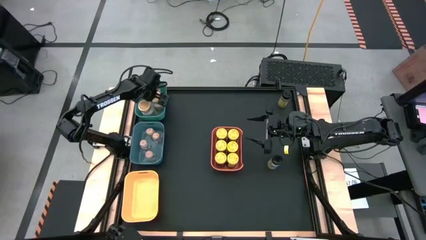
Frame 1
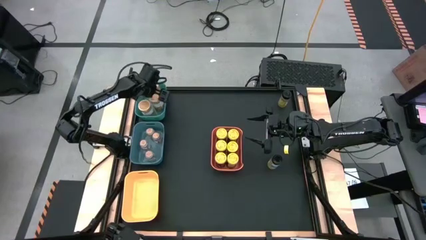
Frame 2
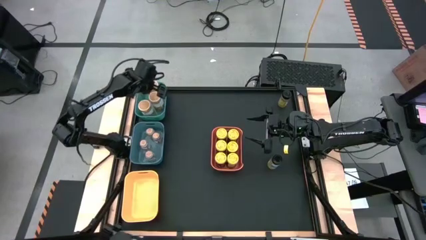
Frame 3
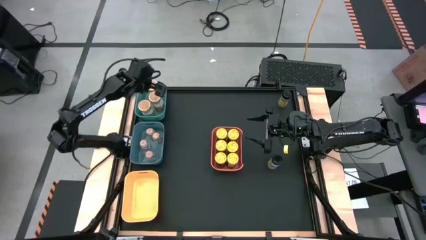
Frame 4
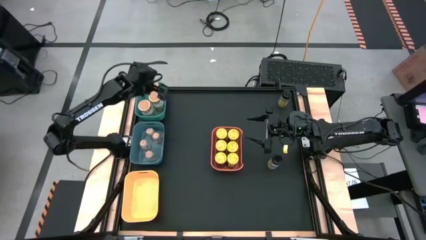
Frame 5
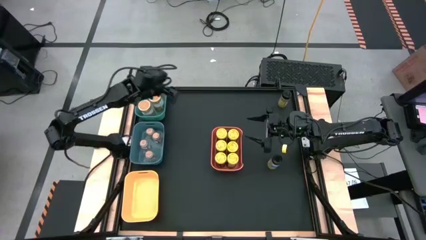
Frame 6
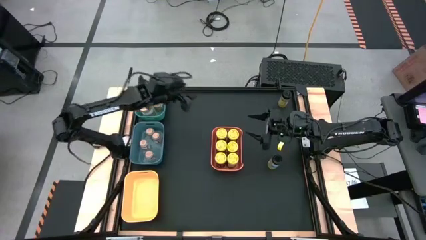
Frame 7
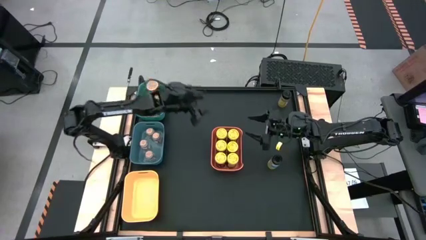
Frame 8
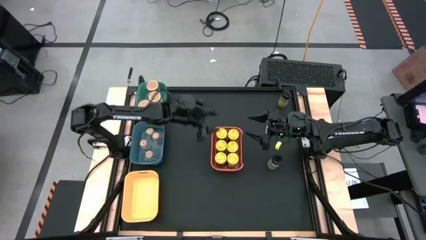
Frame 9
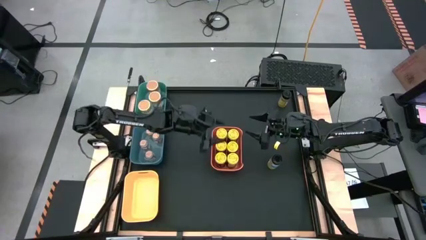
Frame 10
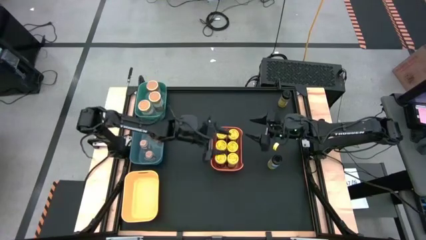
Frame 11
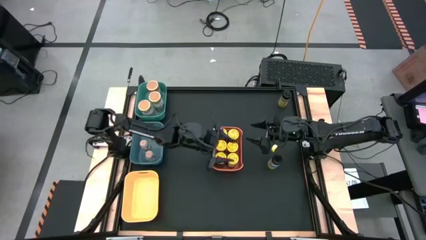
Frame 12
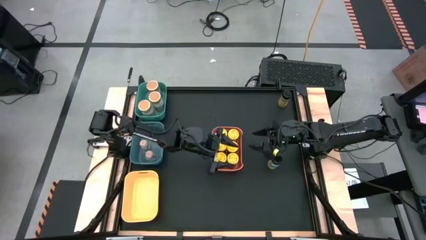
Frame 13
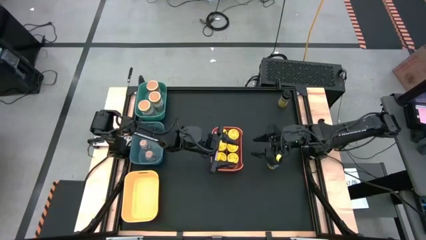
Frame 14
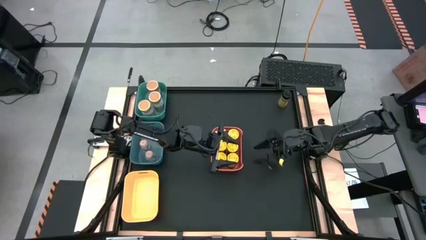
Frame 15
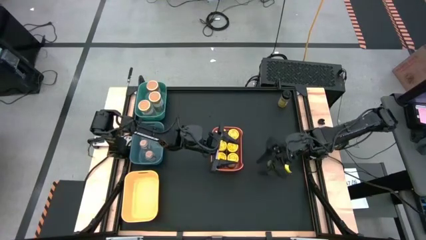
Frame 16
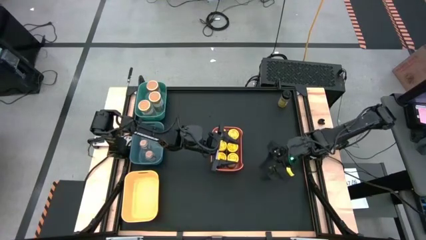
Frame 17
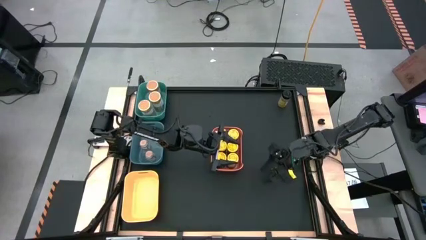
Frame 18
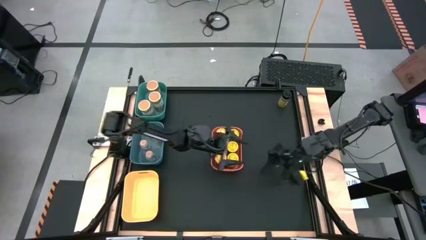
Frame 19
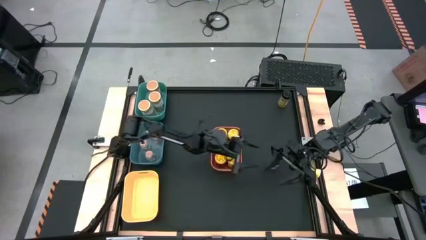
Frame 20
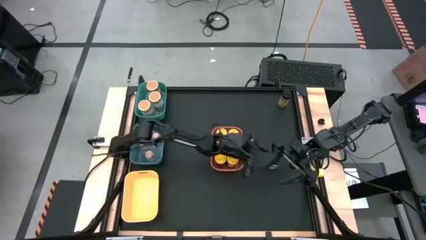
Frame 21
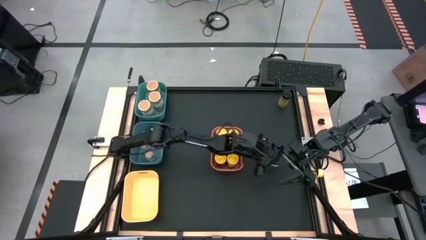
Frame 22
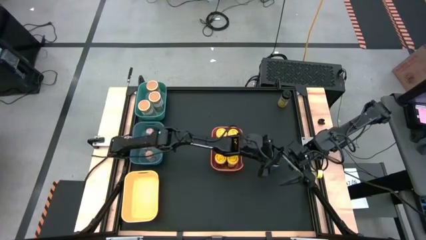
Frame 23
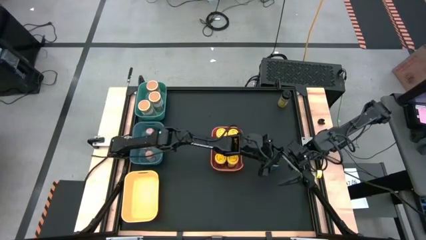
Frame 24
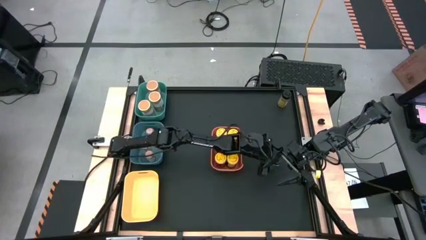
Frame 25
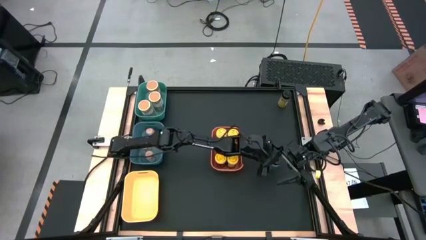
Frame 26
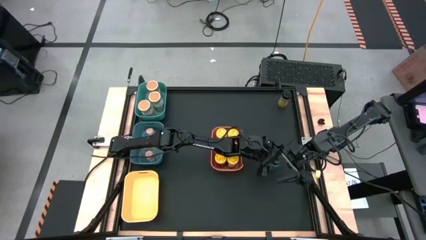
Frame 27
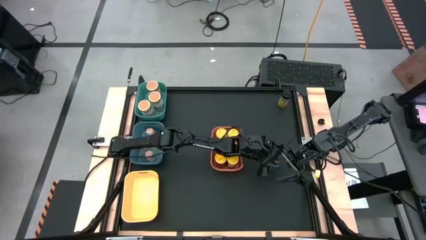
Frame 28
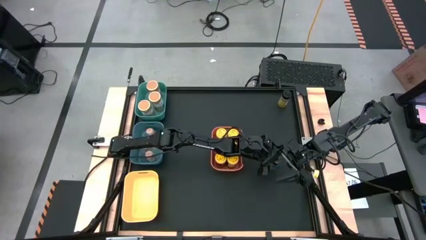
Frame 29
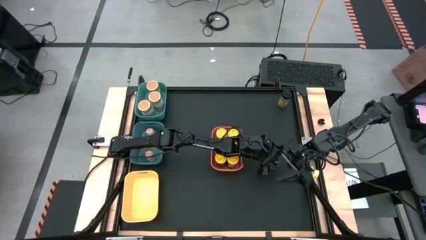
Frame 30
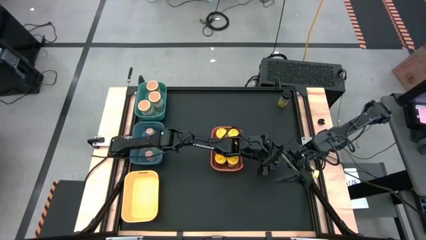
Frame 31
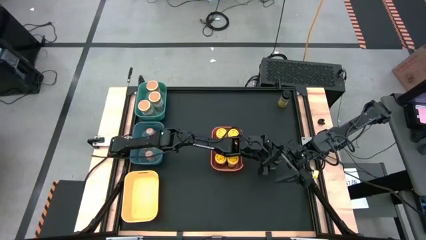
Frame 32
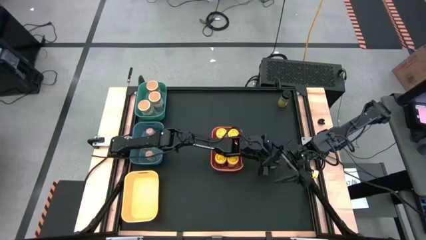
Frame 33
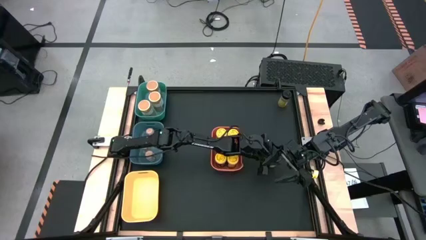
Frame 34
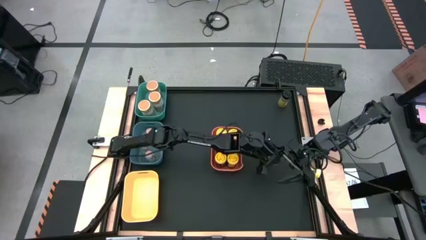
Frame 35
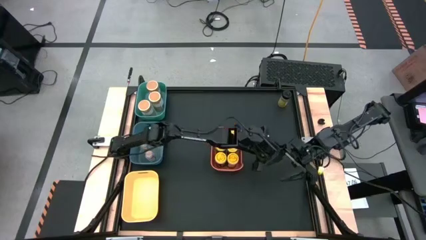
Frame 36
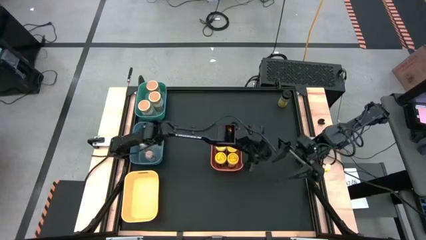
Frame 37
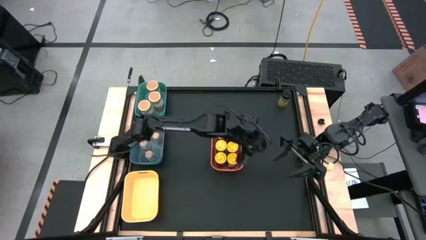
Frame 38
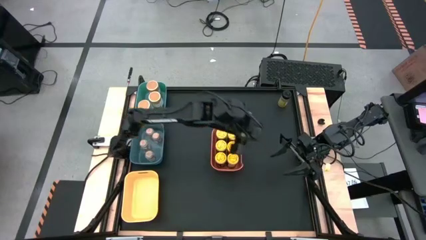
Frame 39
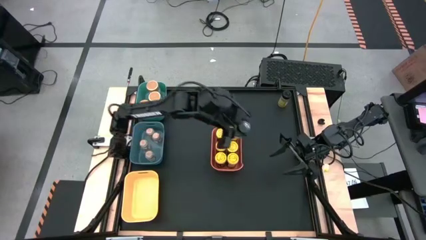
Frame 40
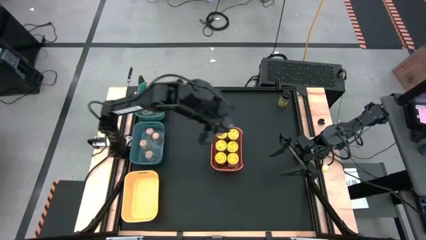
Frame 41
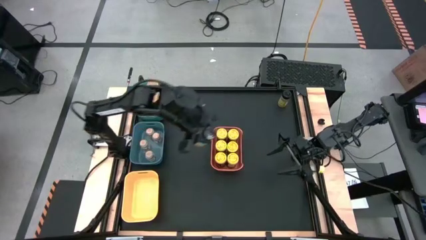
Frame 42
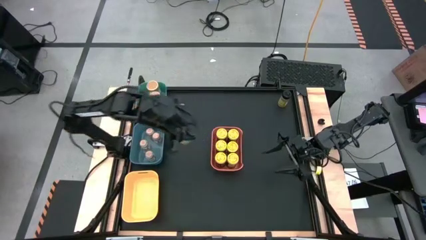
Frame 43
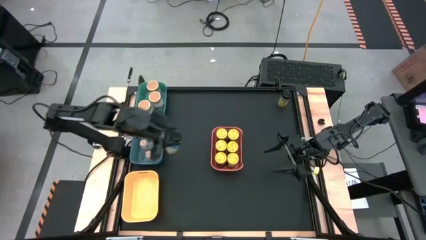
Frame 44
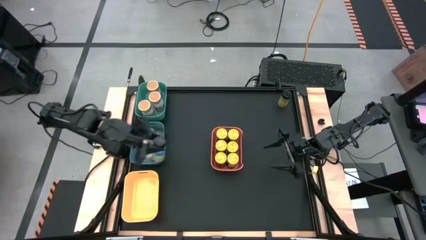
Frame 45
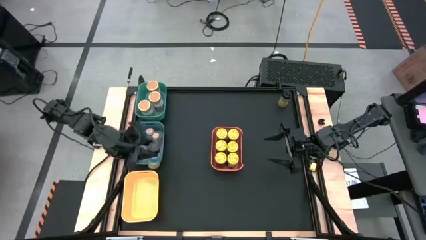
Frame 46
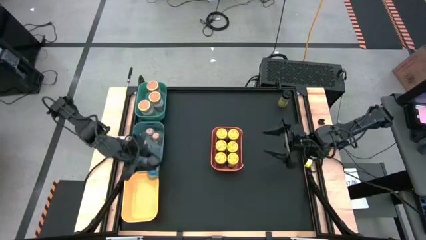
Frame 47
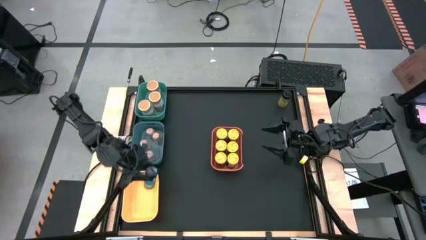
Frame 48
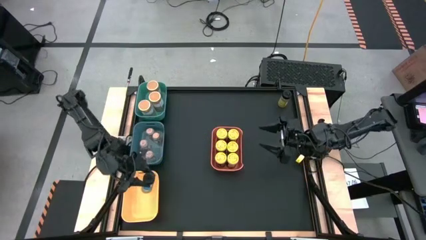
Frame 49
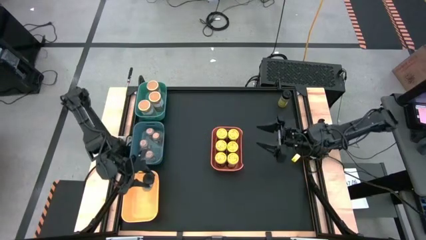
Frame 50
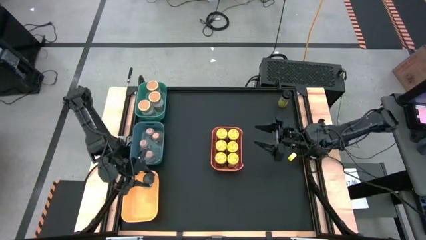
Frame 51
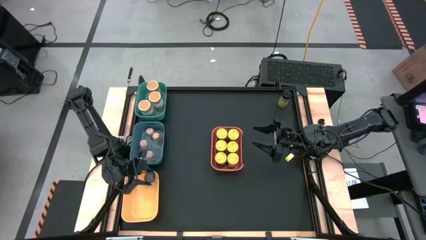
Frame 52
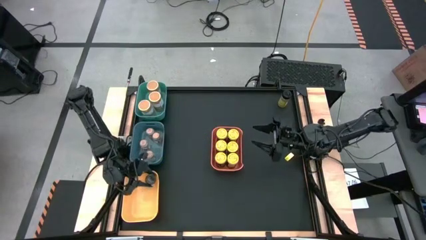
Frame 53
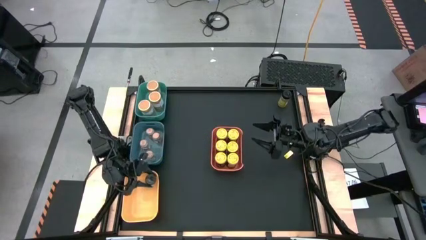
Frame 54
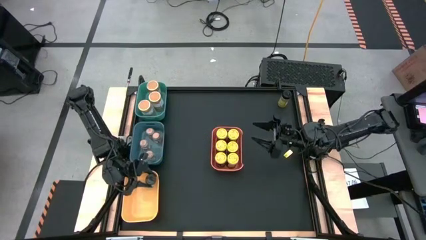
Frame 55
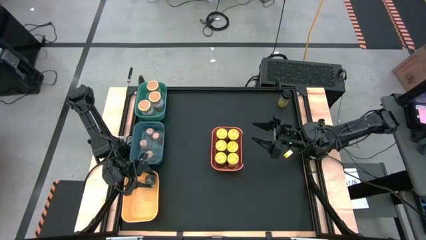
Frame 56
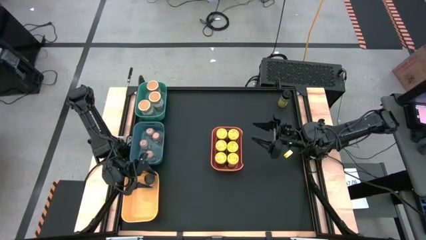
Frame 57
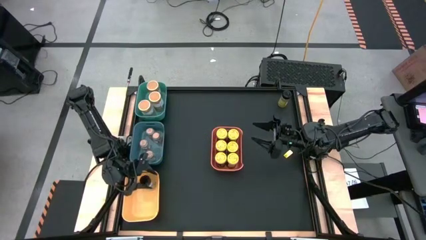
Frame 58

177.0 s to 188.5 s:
Task: Sort spices by type
Put the green seasoning bottle in the yellow bin
